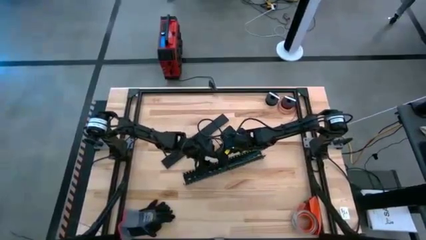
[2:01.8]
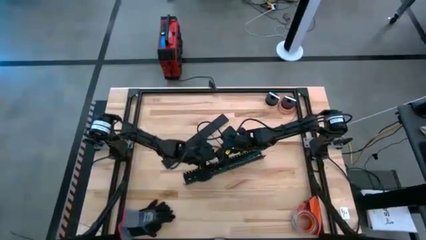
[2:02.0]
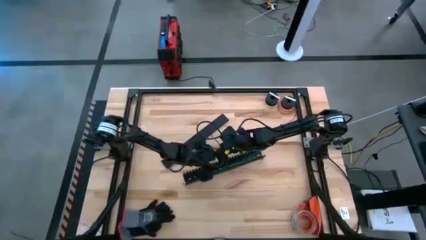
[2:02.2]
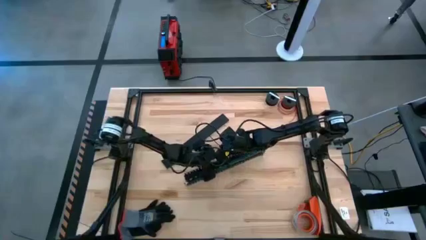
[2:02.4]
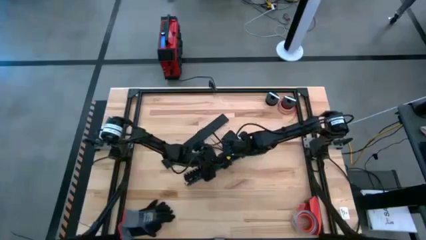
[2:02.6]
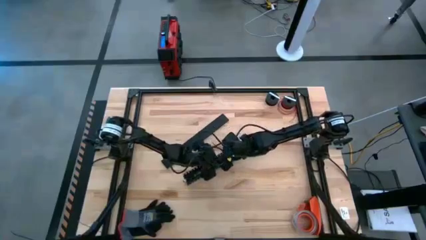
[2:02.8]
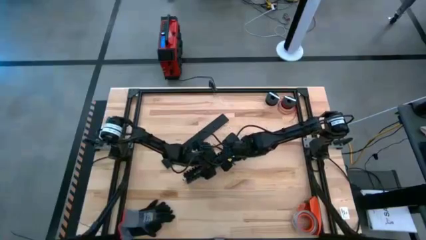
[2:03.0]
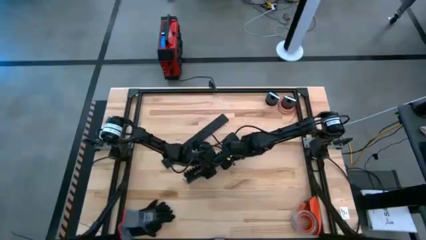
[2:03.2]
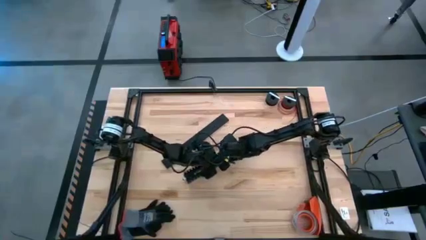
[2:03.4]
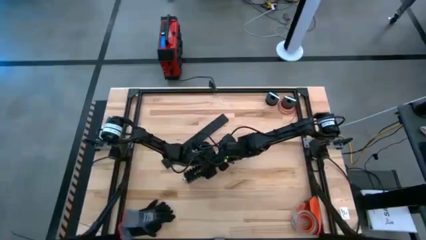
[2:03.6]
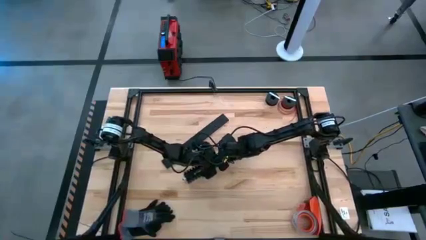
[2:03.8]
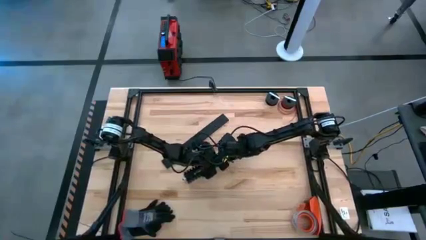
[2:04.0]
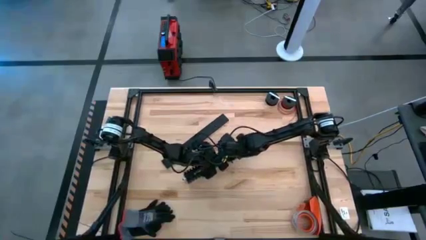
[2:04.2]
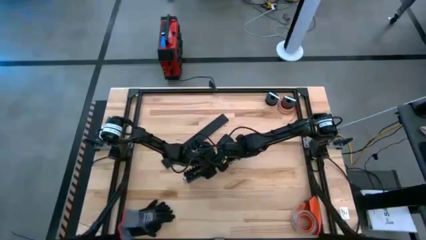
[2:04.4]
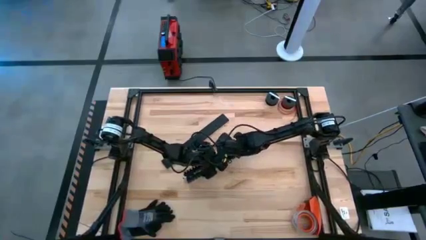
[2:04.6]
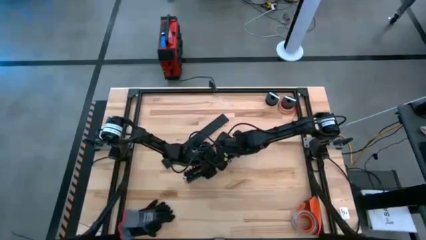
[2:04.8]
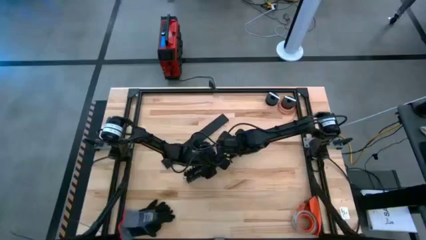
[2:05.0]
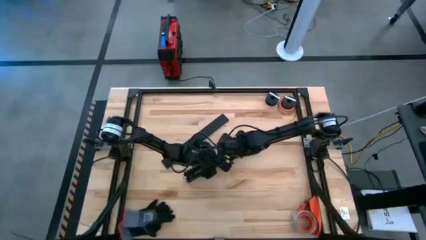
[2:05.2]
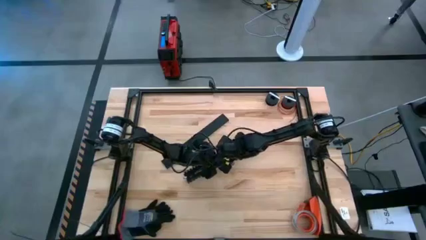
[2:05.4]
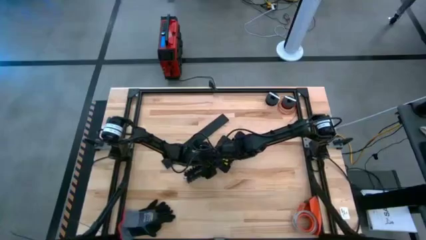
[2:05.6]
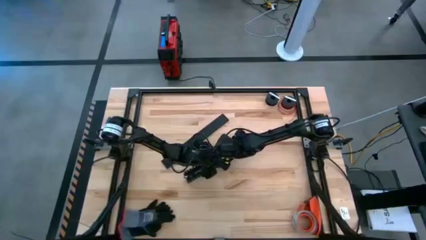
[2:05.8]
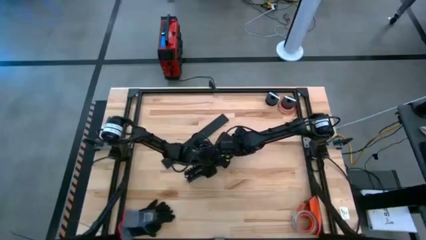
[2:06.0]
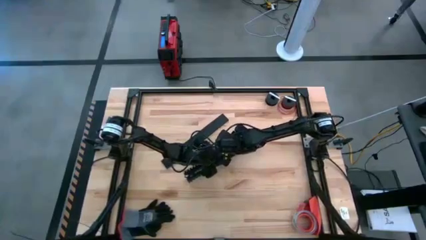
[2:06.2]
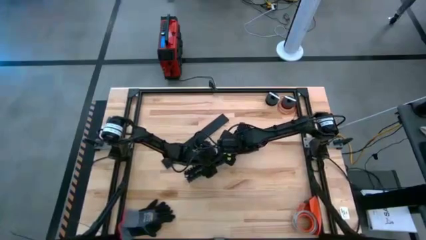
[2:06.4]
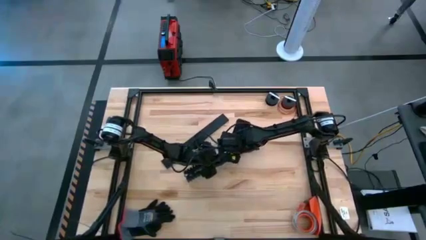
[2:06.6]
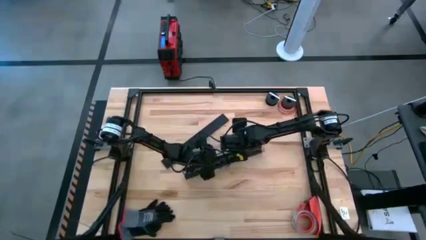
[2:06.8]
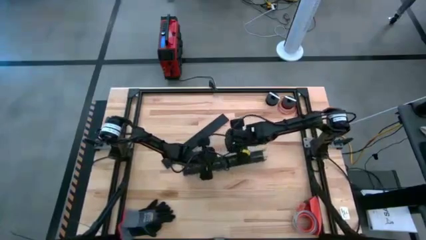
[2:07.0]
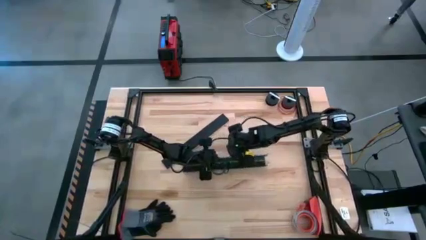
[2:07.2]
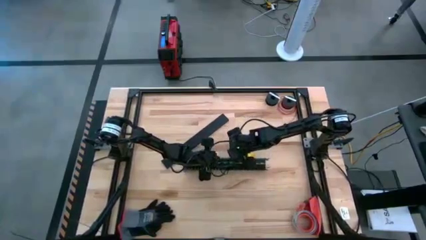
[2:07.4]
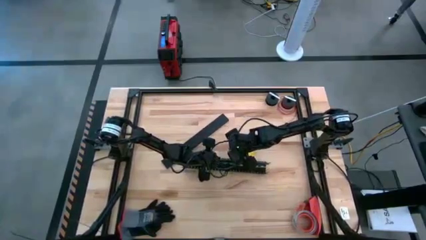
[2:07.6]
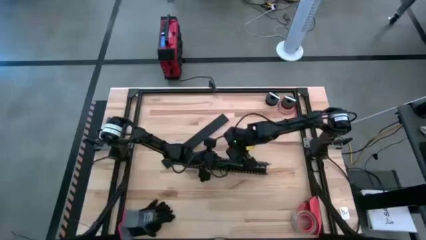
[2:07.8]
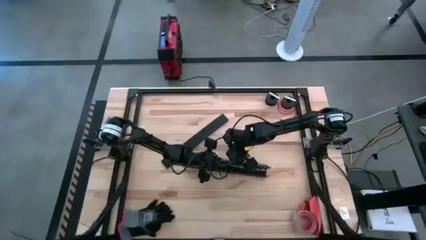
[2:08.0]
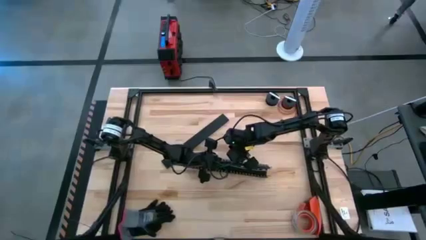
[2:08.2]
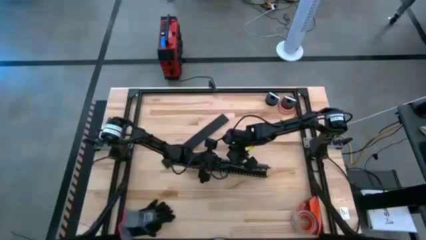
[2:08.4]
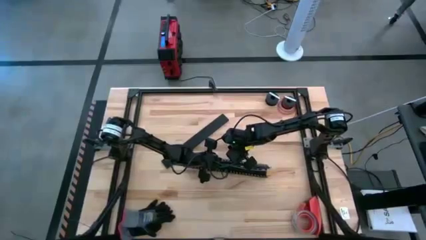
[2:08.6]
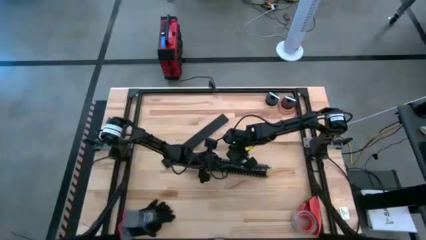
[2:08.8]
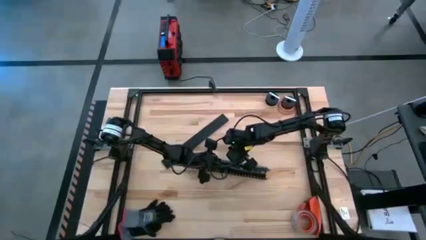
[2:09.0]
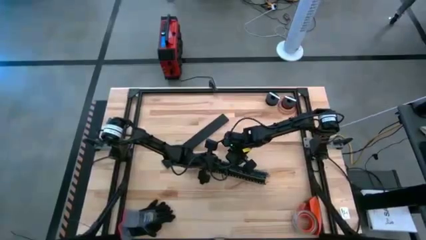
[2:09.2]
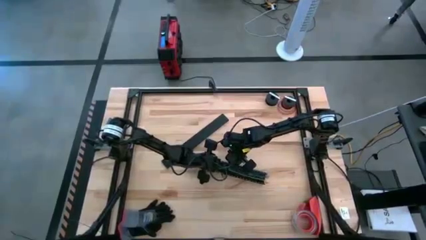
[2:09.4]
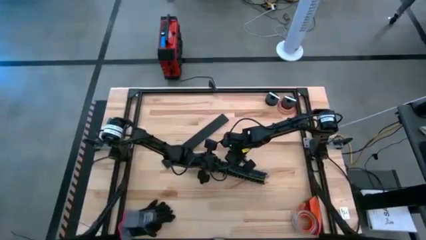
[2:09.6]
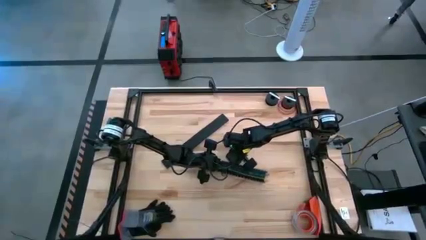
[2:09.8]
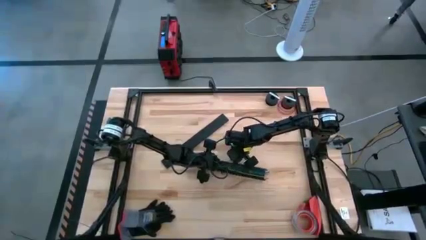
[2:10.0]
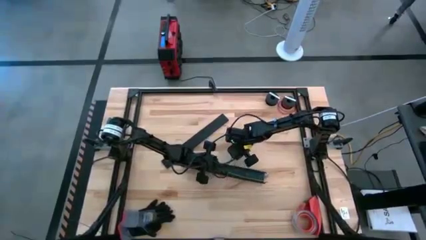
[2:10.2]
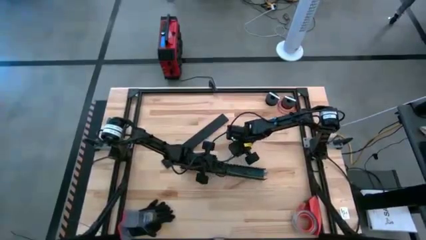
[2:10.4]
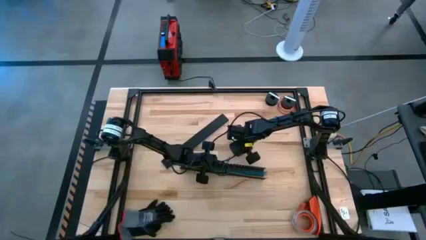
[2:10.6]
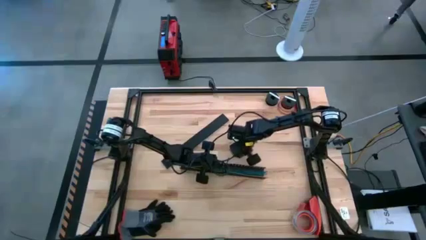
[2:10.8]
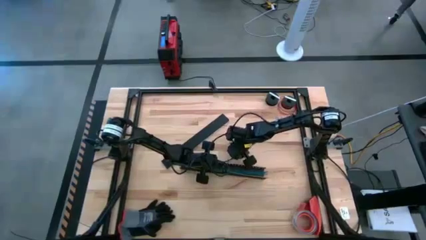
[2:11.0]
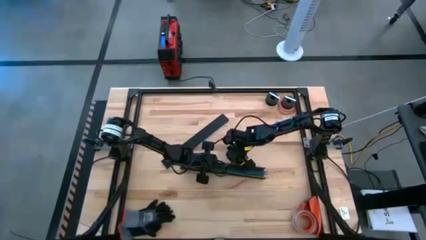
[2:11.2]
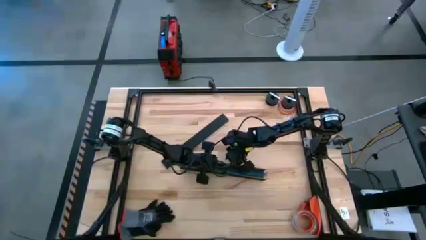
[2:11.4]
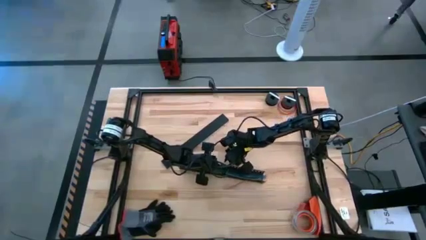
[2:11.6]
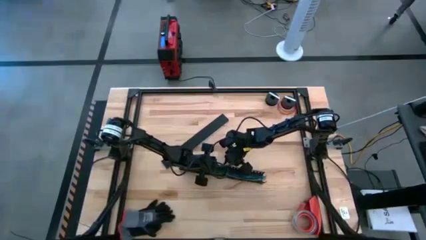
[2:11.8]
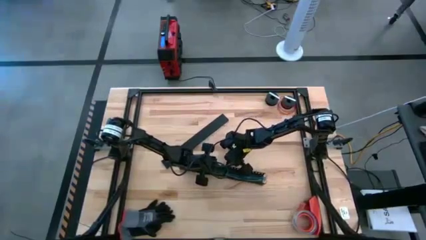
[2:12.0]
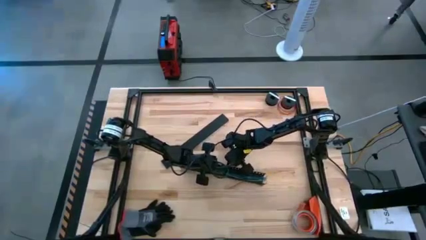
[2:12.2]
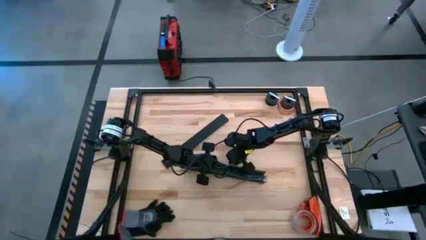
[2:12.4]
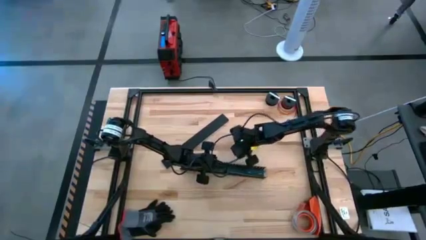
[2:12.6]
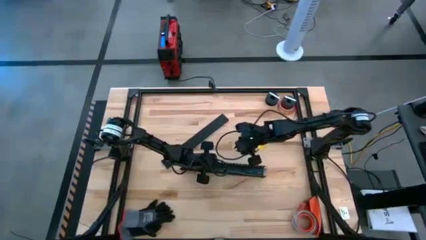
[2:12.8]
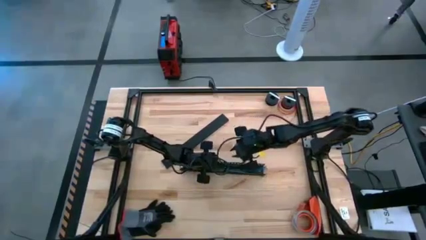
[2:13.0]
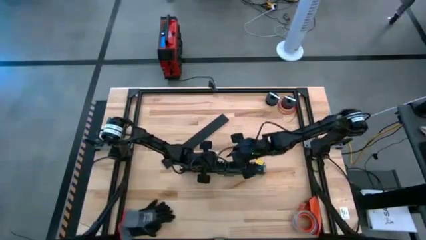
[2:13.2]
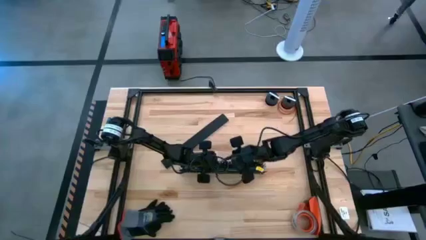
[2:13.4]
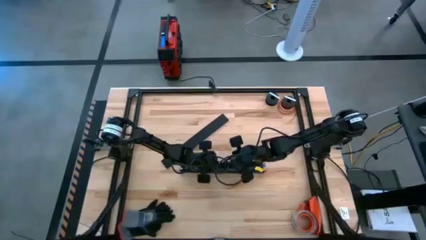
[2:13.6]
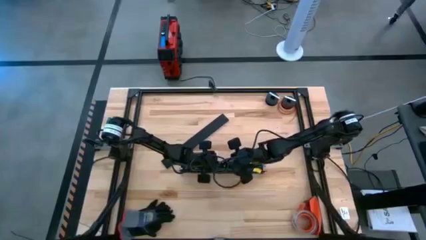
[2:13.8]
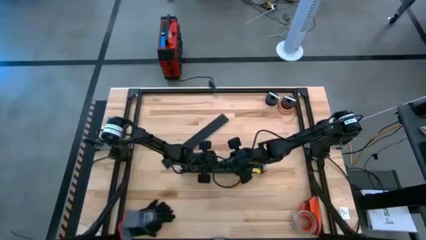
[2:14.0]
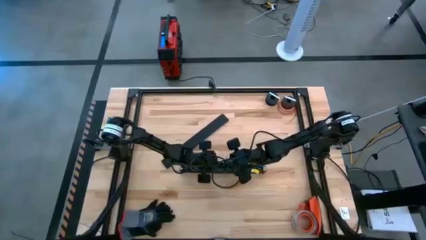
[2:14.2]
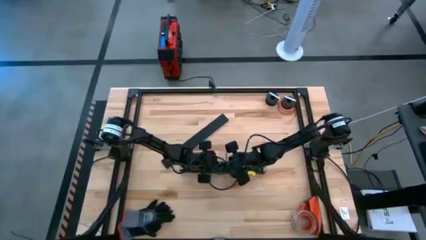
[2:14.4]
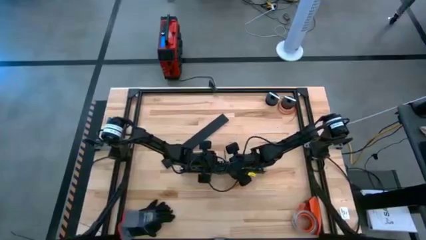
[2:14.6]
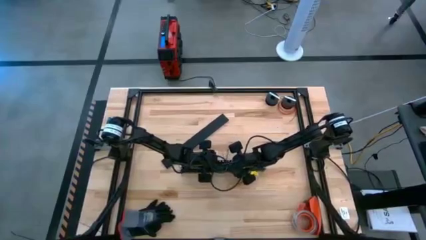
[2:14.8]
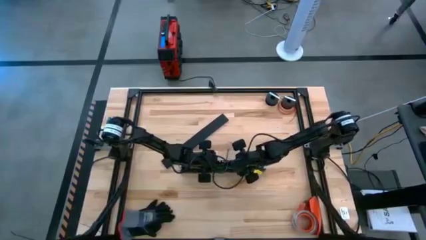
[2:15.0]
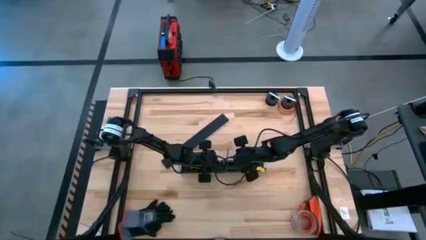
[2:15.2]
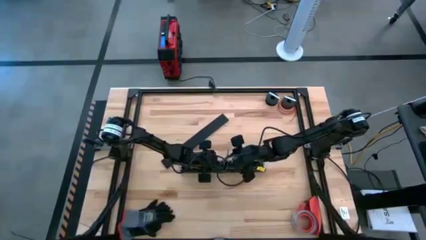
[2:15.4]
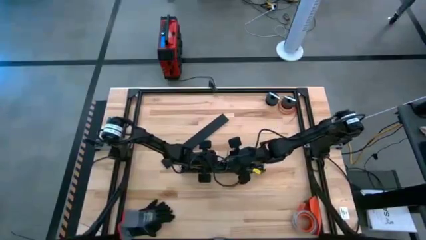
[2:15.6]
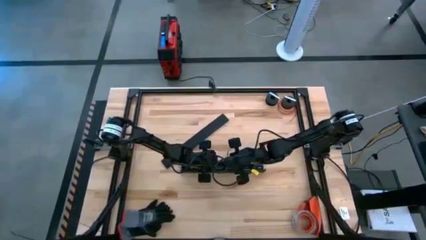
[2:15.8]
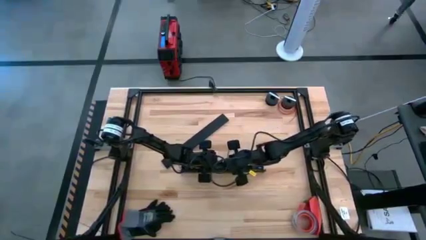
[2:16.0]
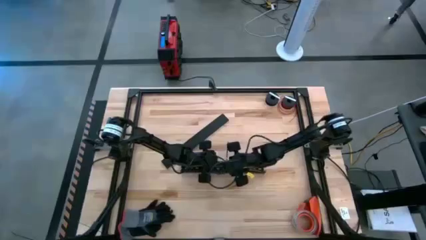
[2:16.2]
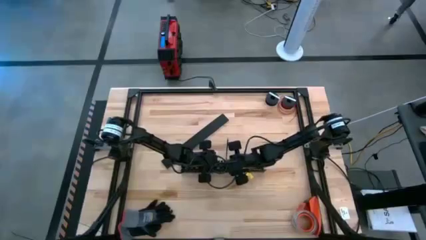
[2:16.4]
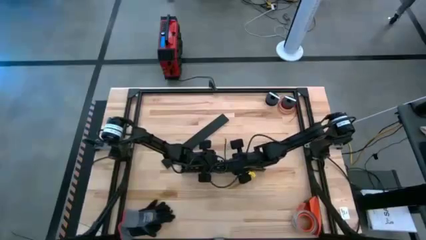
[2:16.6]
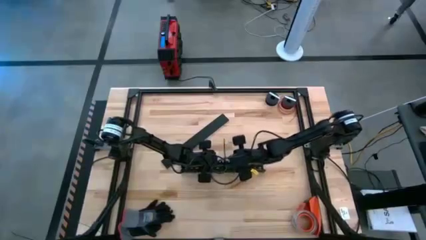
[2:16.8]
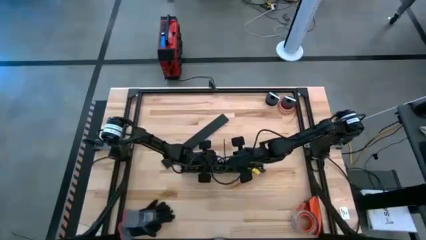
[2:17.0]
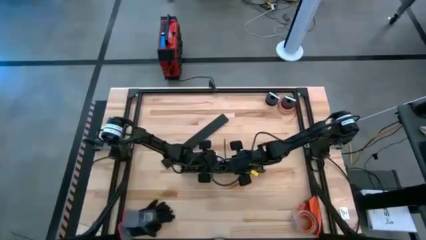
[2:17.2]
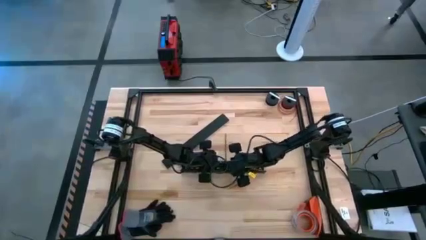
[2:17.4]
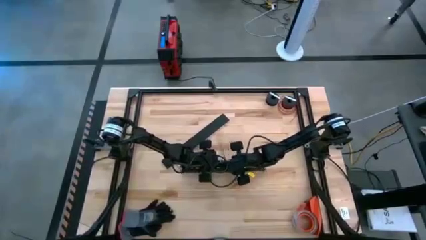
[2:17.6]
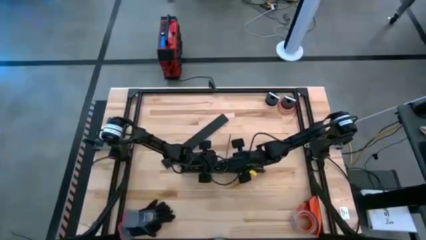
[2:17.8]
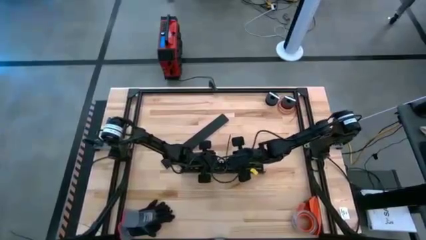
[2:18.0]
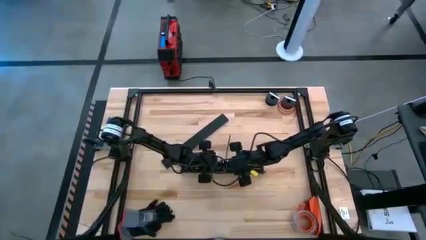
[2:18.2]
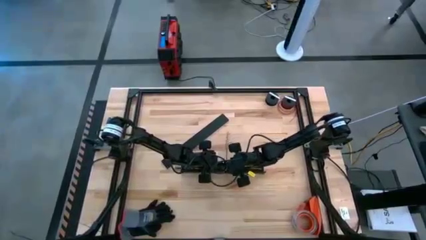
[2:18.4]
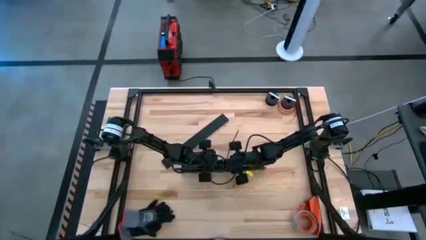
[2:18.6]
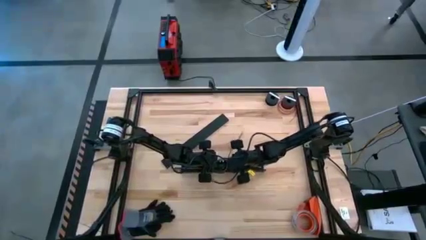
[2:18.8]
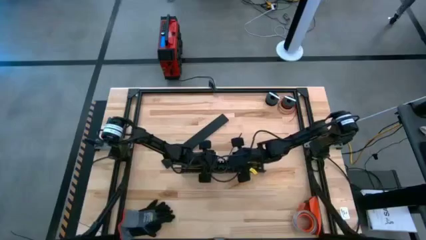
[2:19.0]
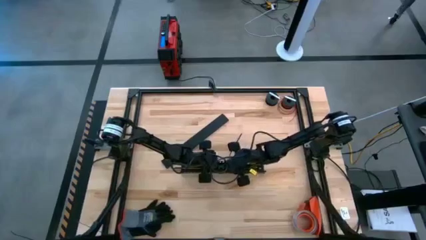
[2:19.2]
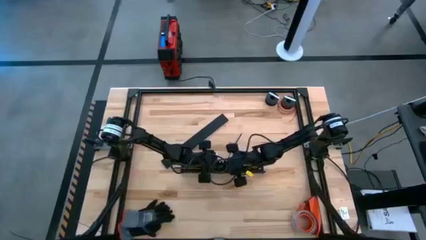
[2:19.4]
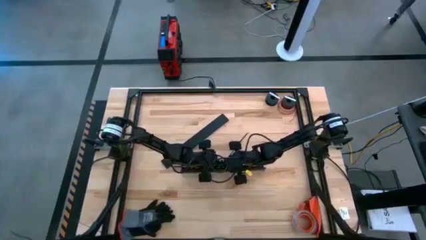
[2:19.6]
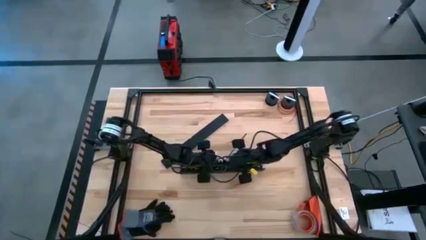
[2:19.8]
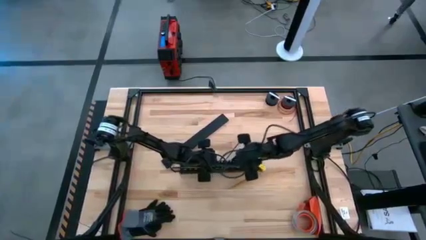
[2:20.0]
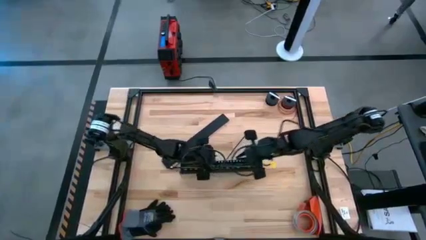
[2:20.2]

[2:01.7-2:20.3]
Task: Ziptie cables
Put the ziptied cable wires in a black cable duct
